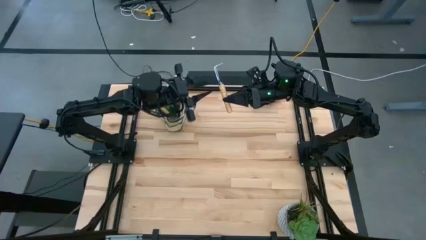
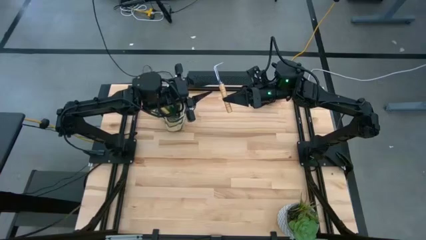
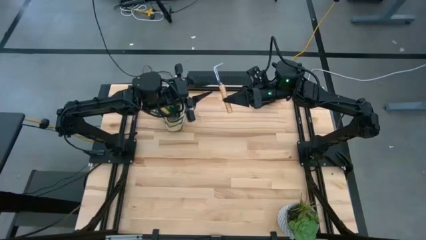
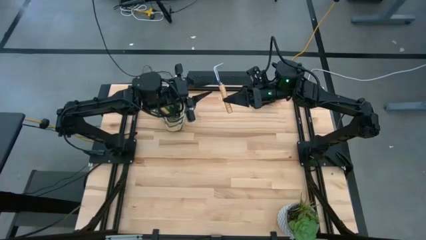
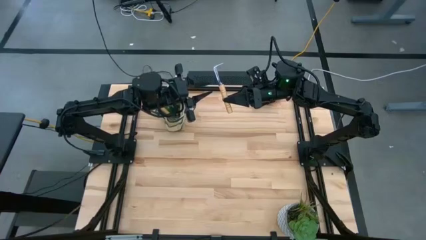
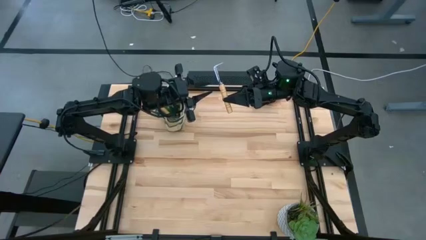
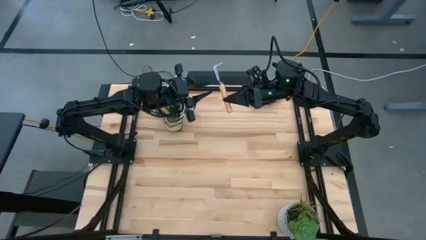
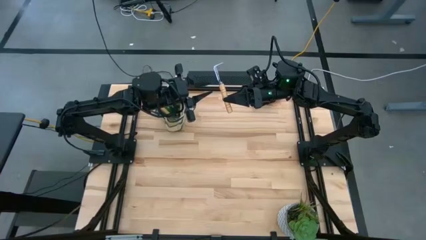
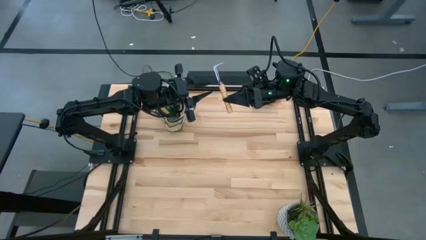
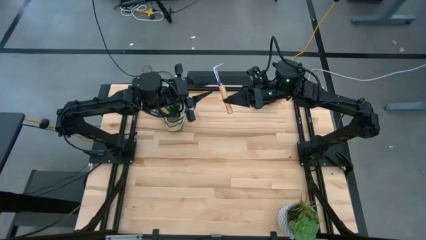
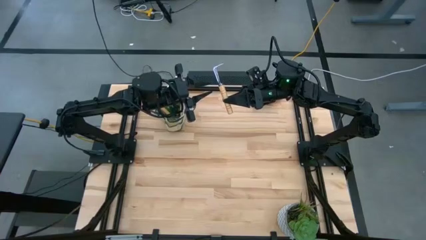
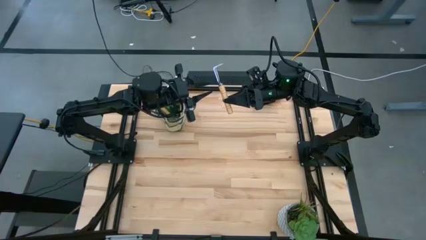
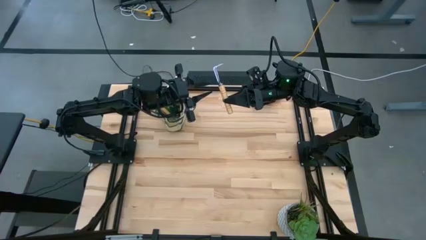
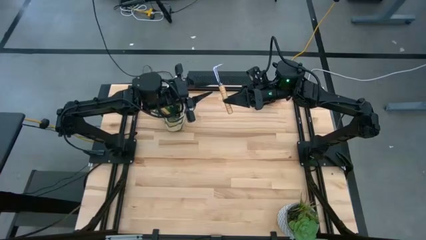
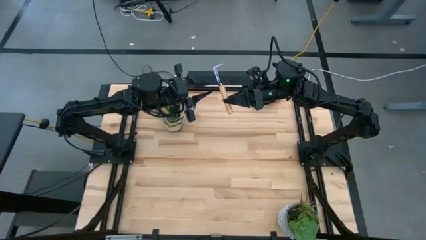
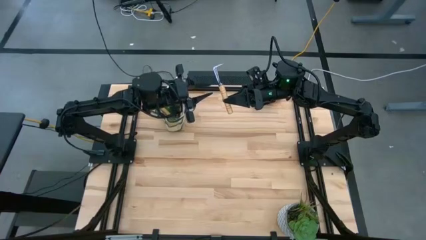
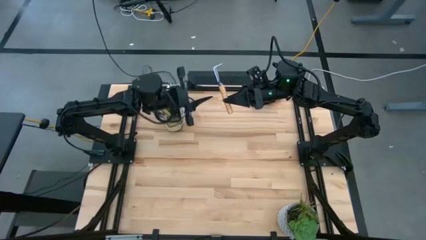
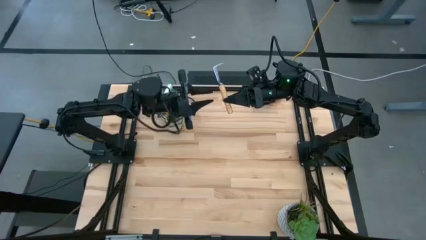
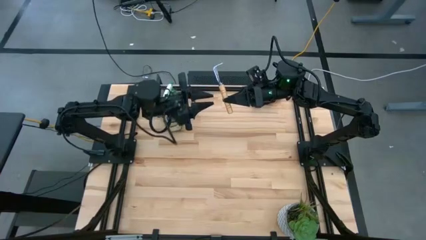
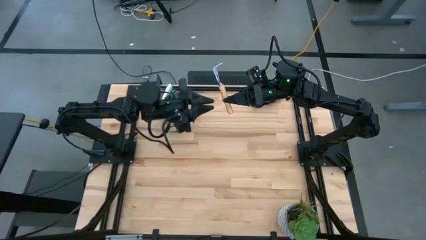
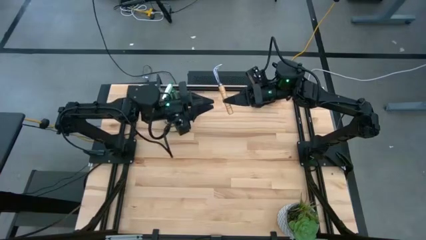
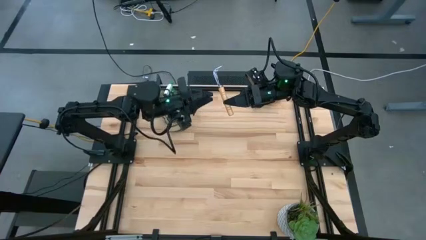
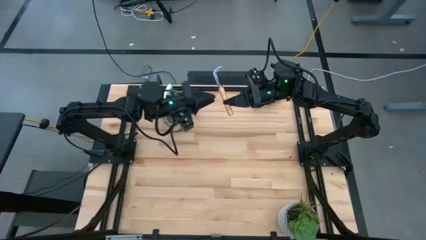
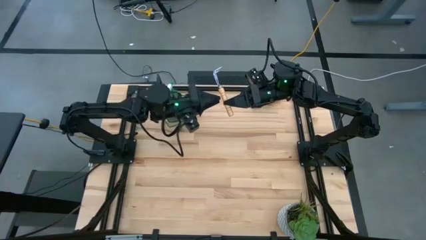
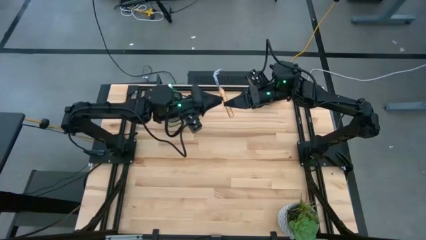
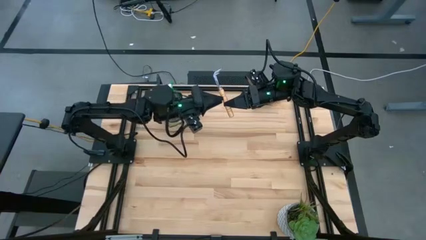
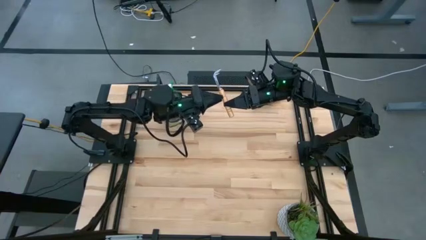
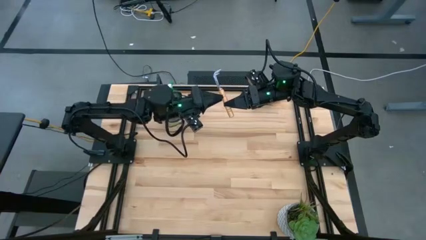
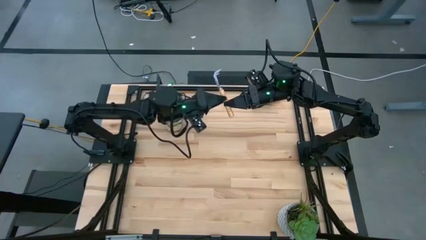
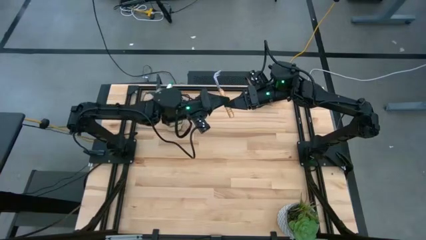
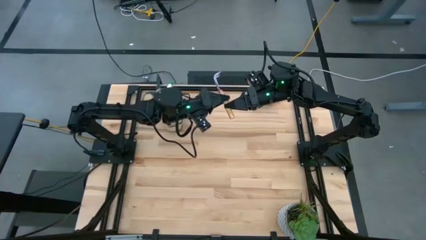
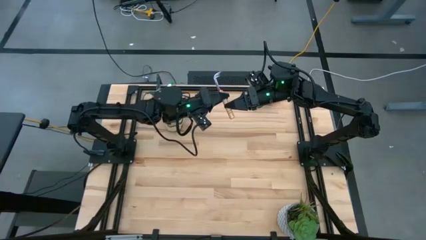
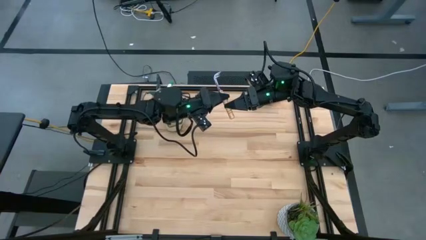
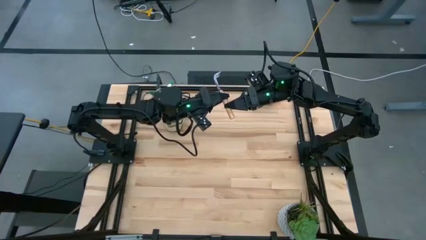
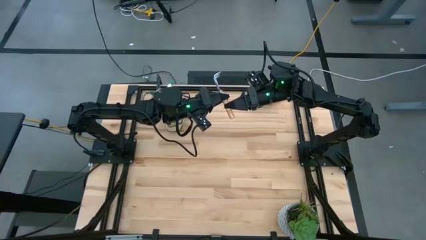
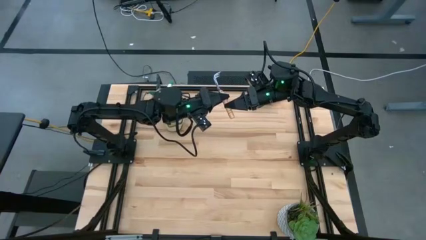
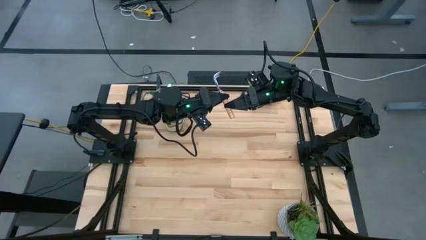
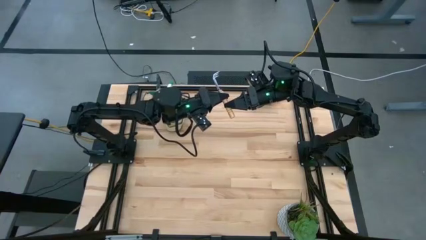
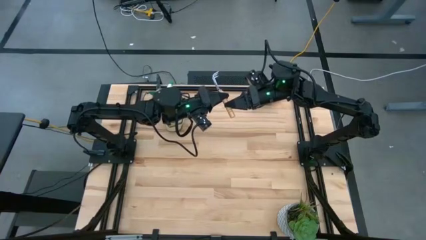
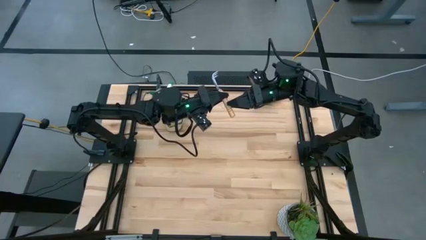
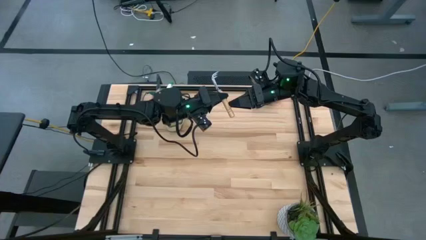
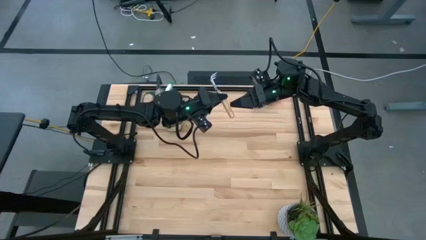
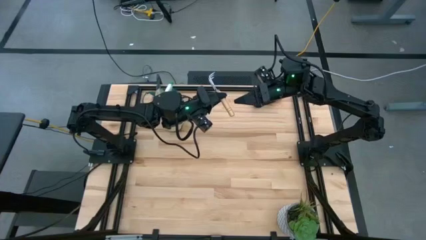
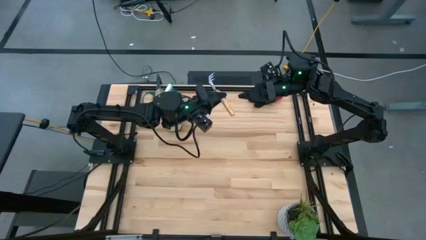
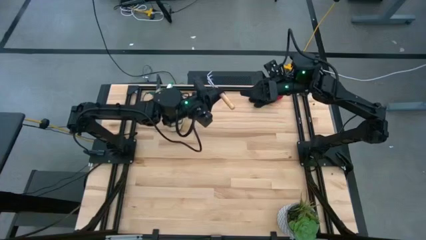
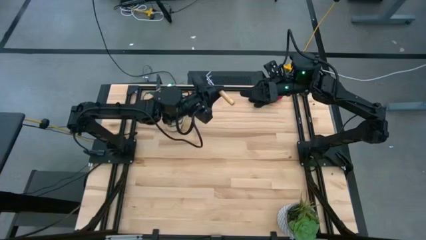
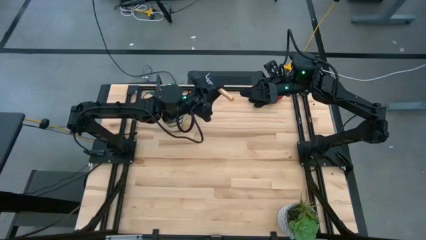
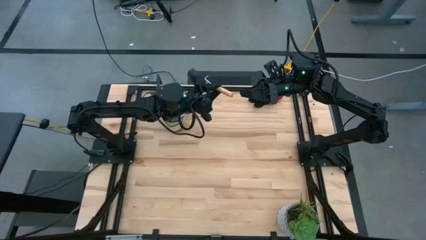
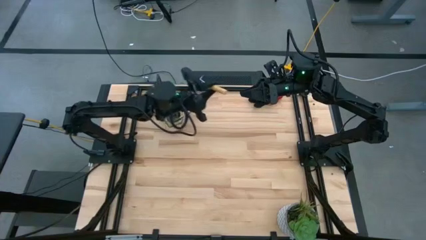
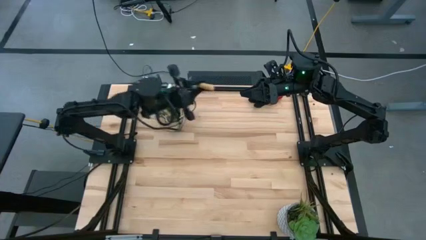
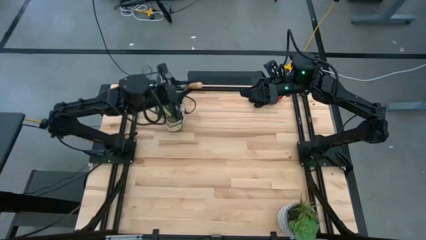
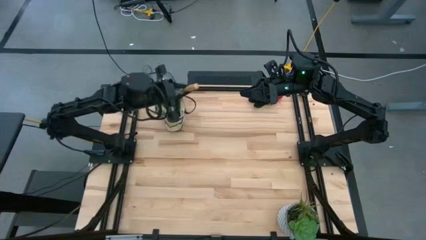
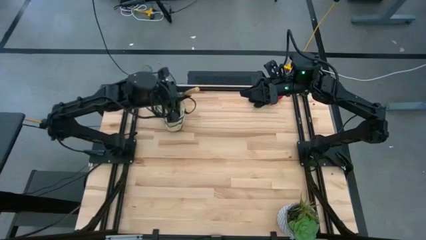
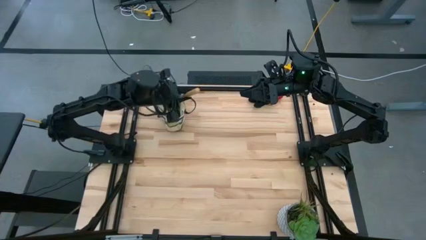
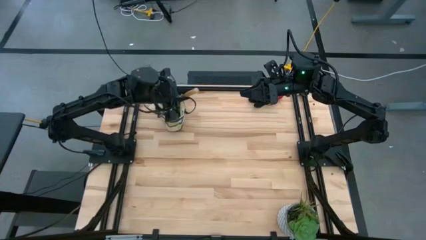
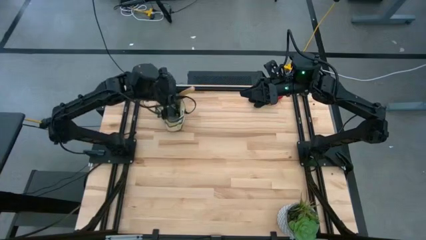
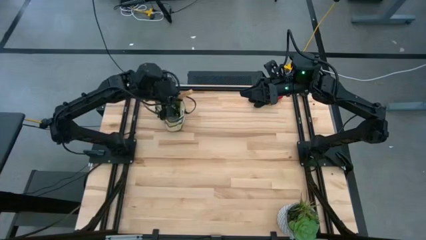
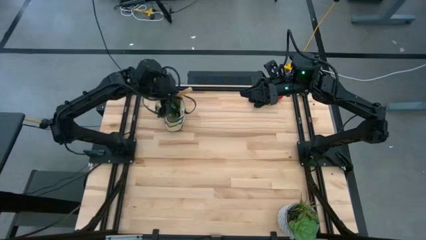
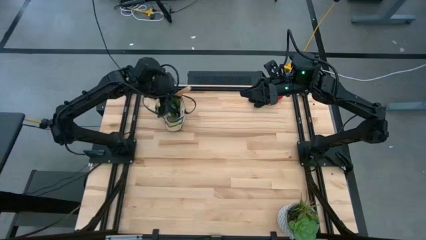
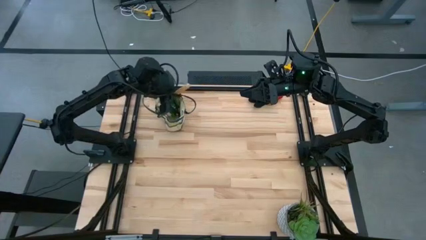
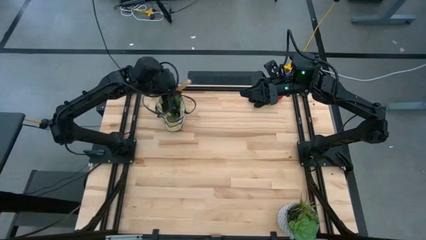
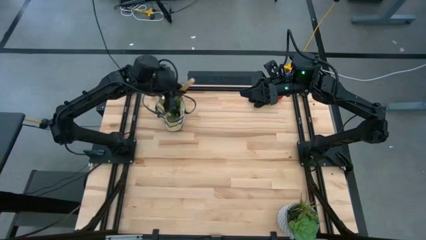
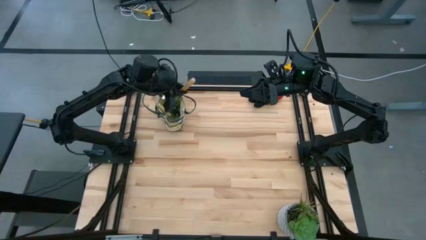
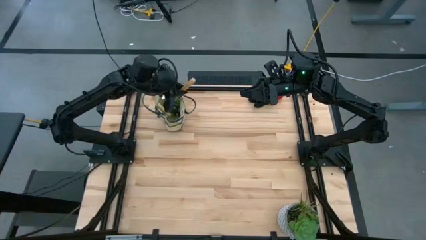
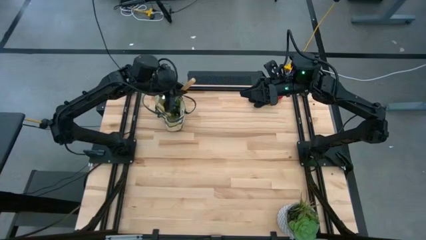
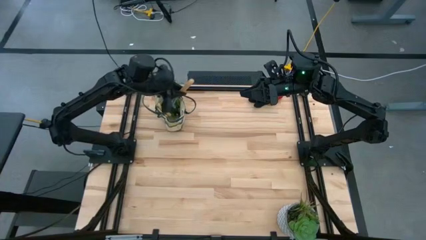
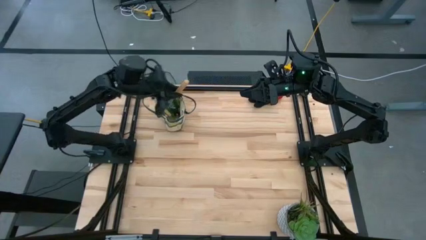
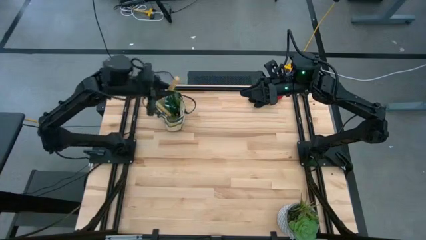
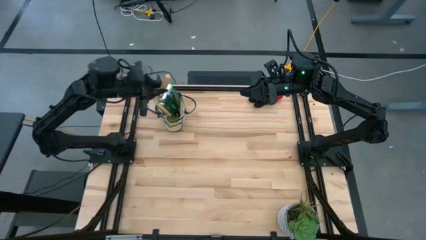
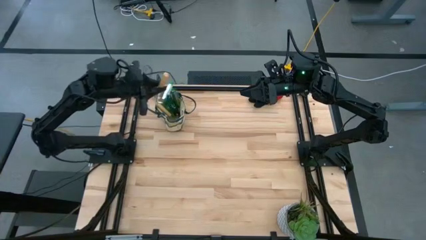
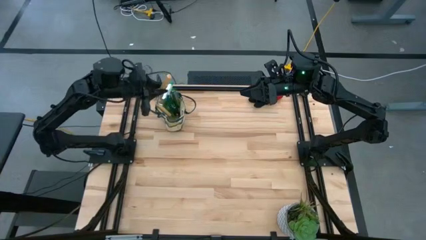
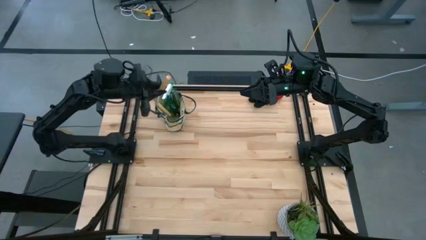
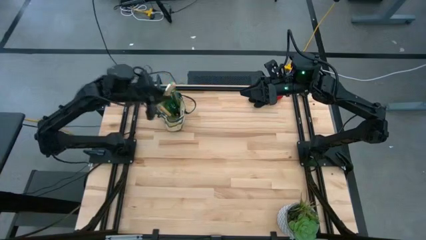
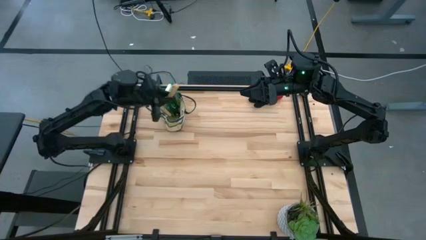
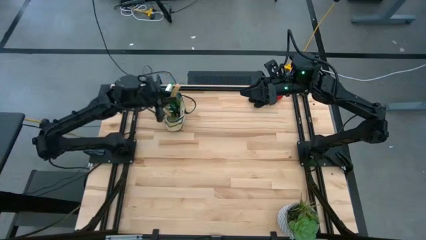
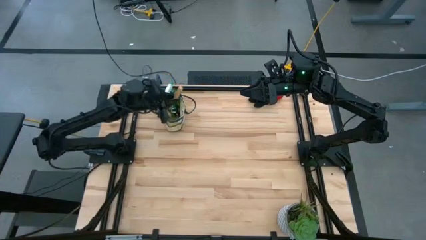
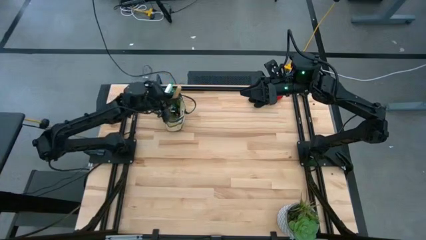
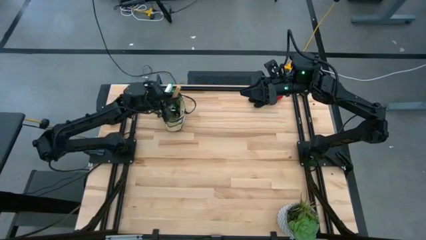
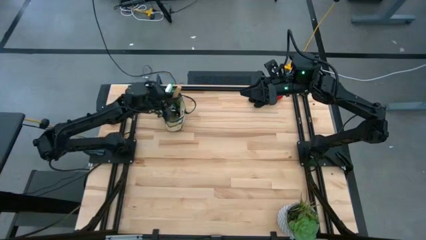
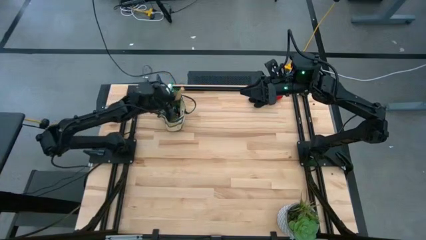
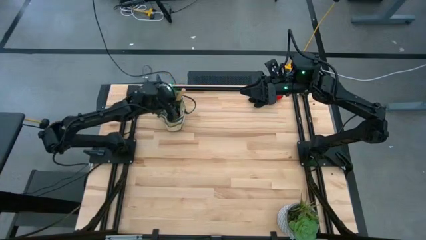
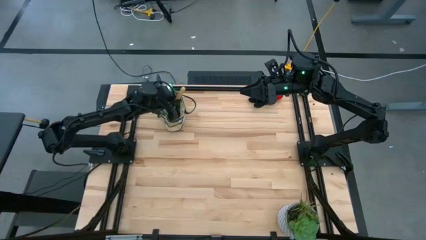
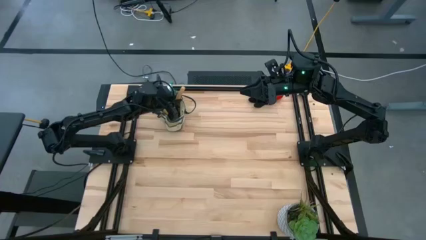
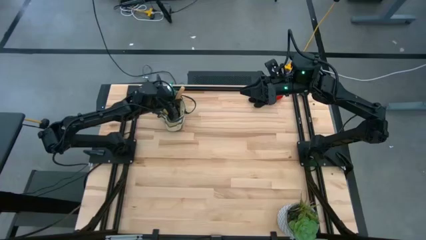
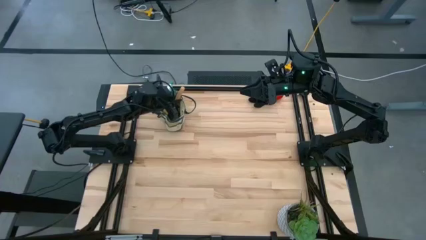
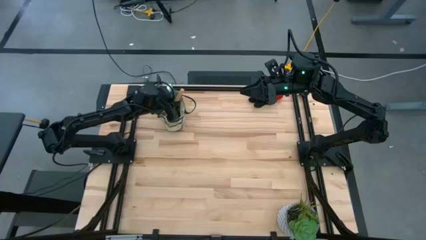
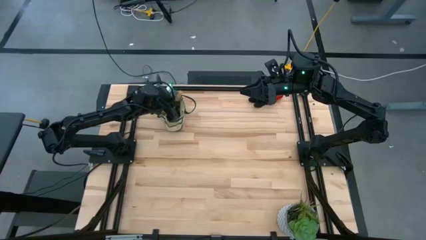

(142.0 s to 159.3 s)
Task: Pick & Place Garden tools in Gardening bag
Put the brown hand rake into the gardening bag
